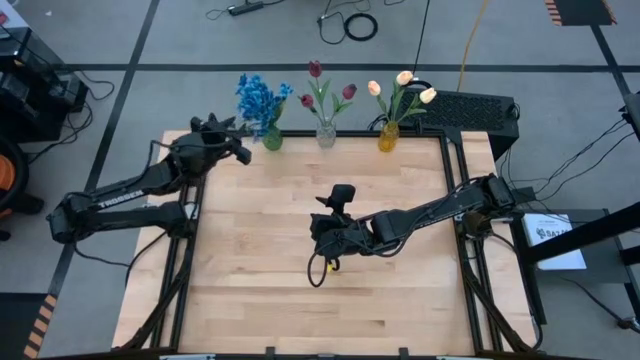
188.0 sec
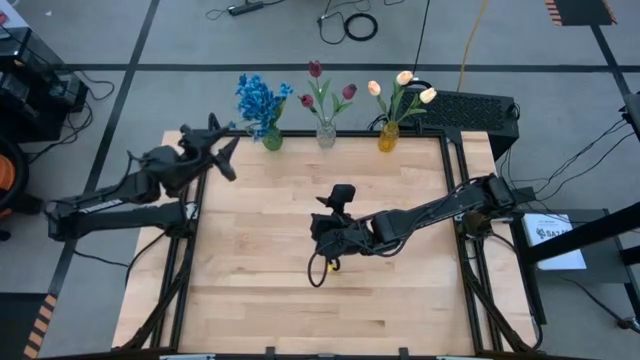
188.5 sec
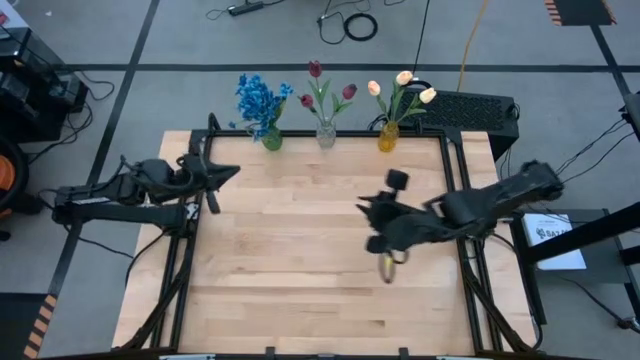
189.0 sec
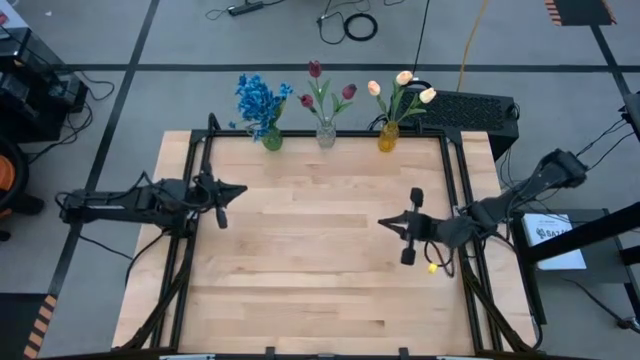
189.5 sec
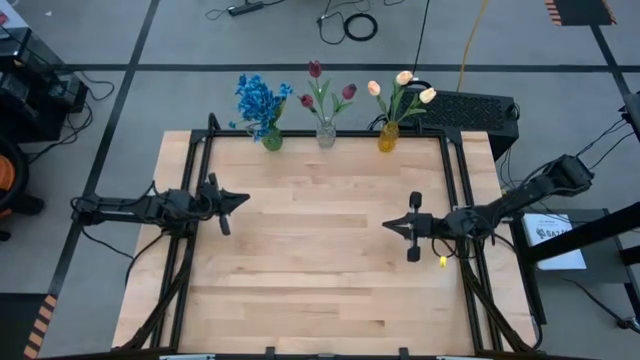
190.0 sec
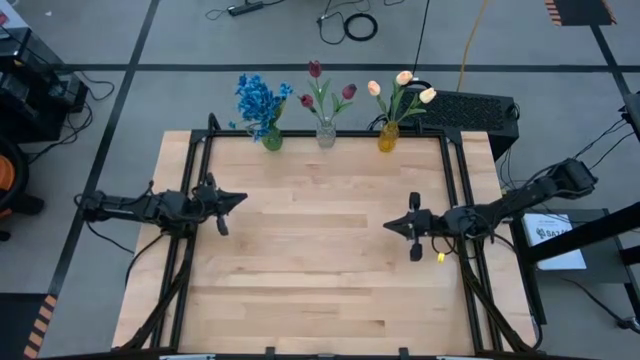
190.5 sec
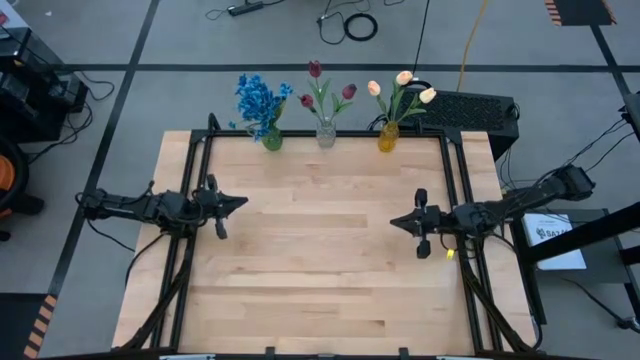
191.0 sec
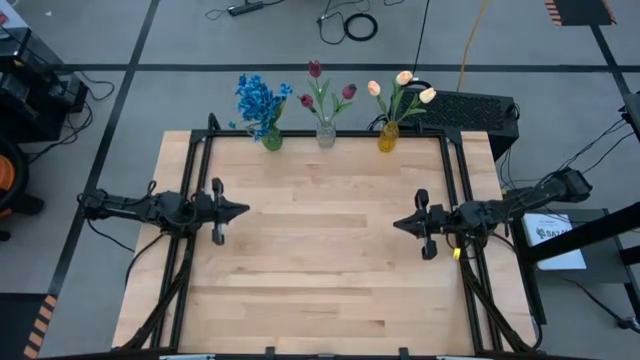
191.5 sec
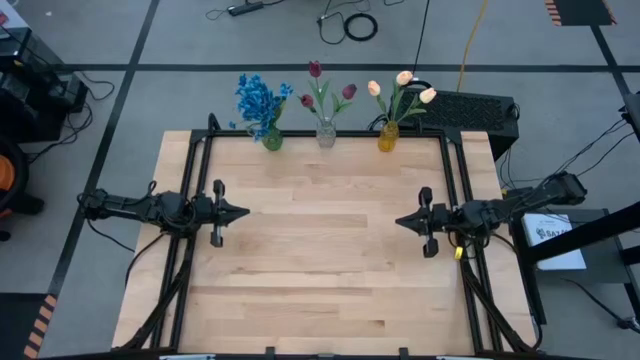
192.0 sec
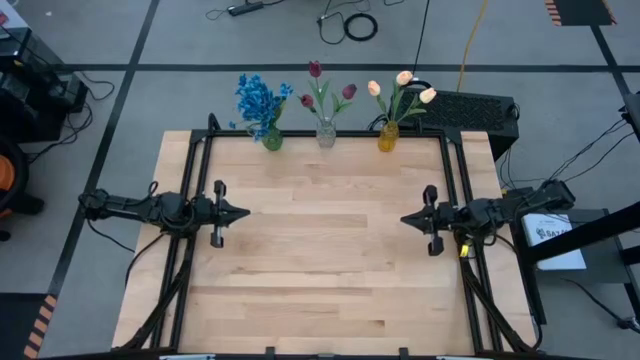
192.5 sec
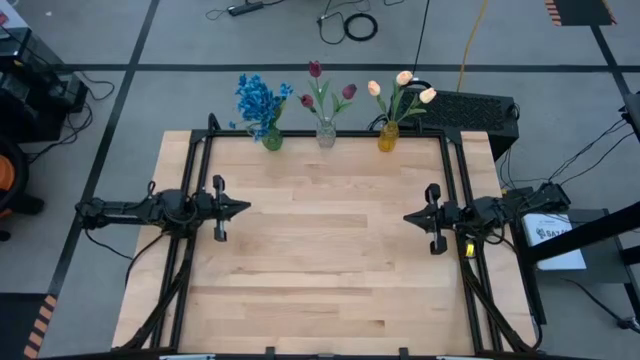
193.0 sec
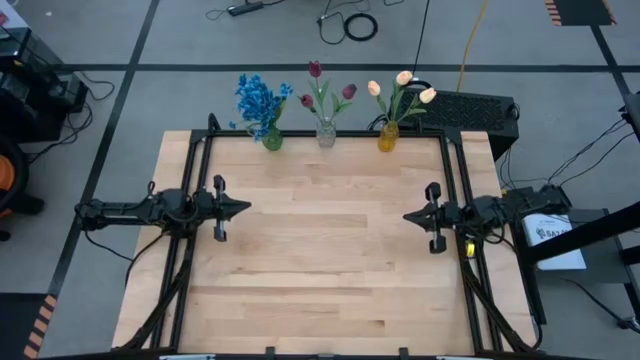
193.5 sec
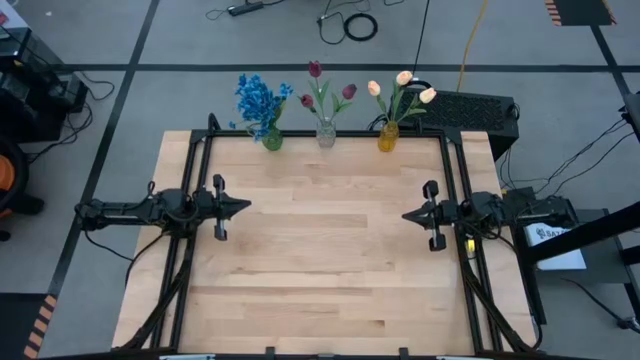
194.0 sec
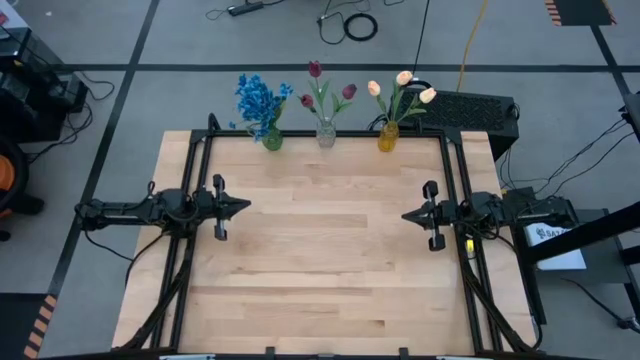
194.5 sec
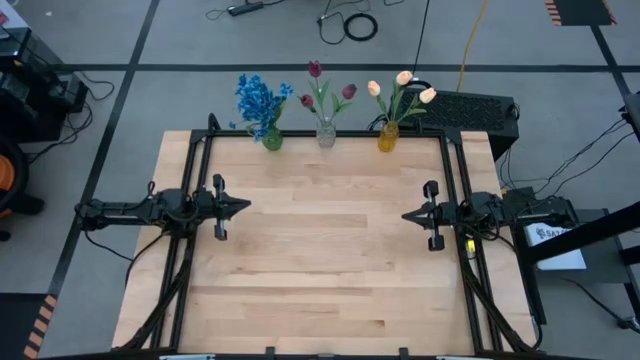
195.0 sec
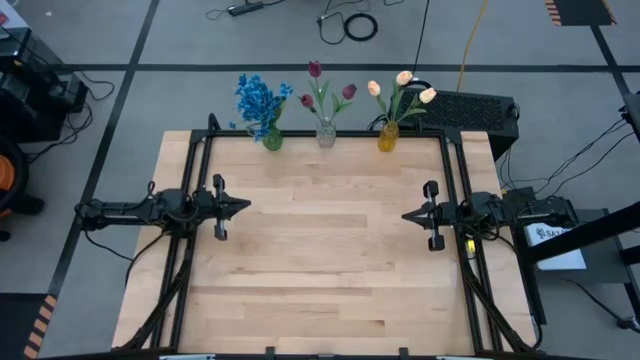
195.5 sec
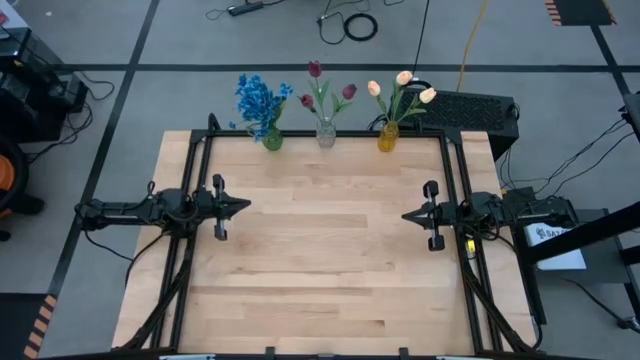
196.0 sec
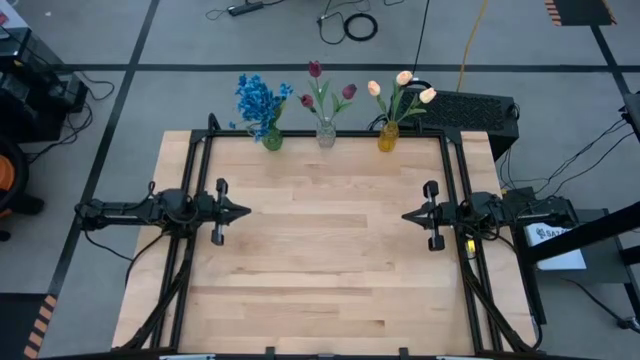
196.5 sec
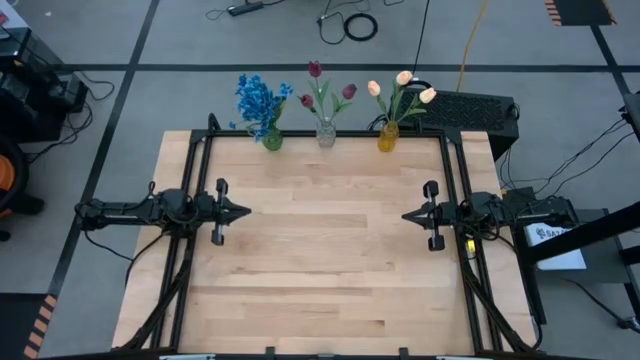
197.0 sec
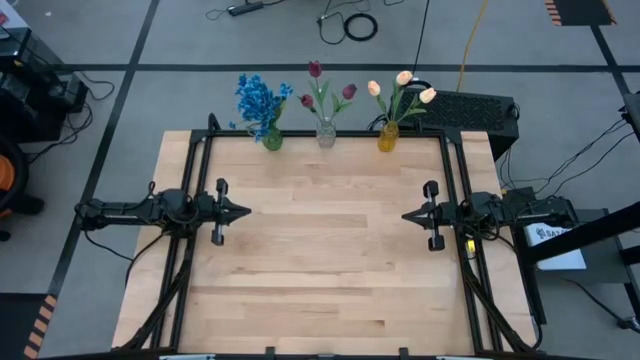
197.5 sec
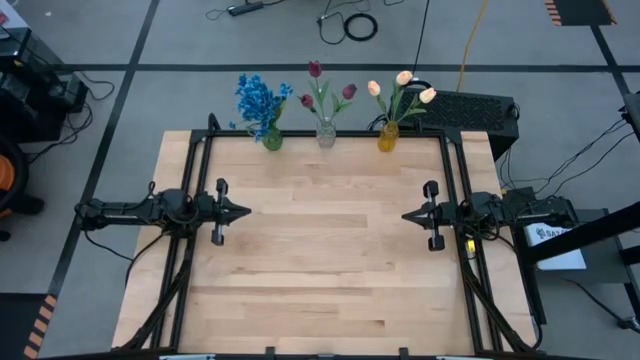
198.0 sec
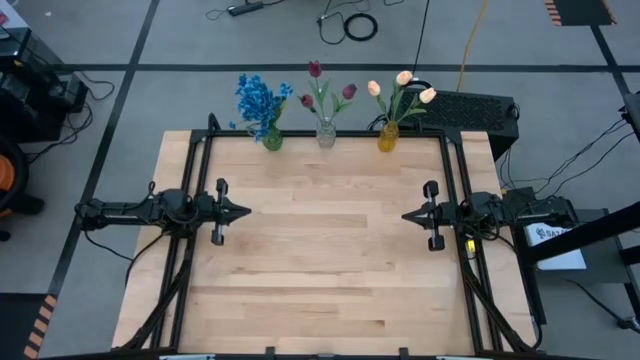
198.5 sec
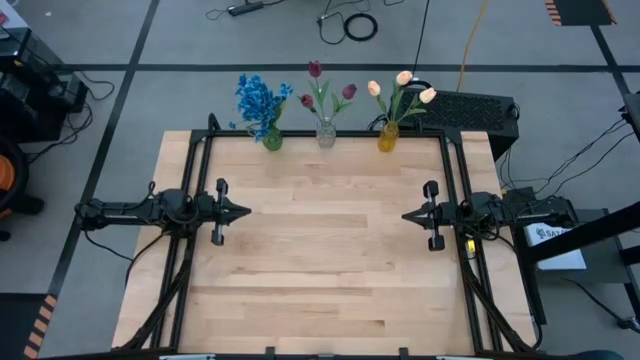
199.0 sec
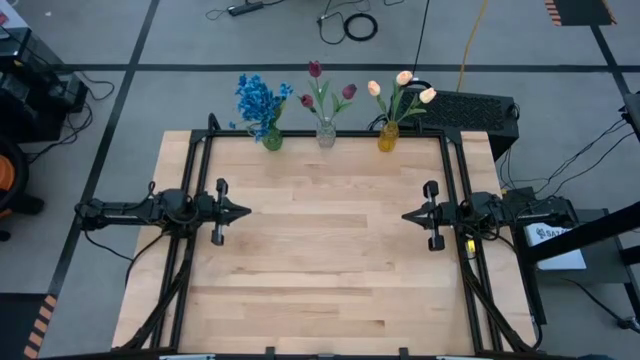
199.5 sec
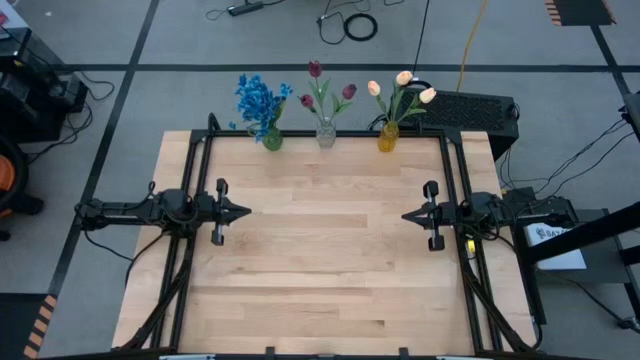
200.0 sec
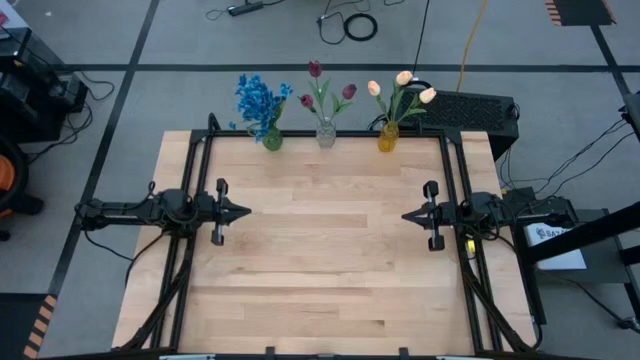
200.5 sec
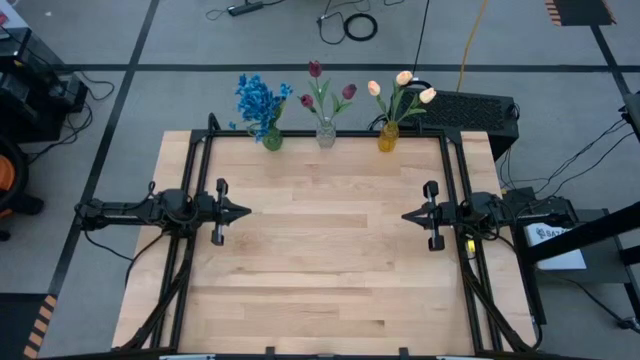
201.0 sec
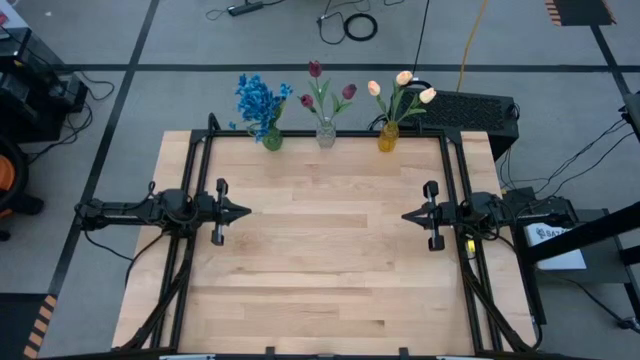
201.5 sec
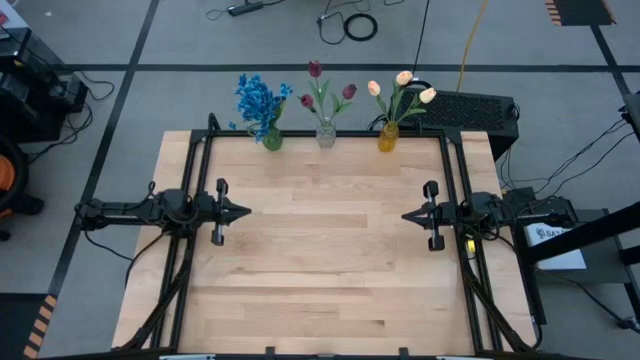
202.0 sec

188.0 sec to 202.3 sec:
Task: Sort flowers into vase by color
Return to Home Position

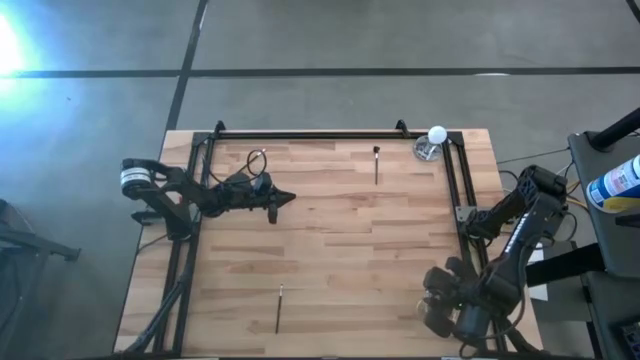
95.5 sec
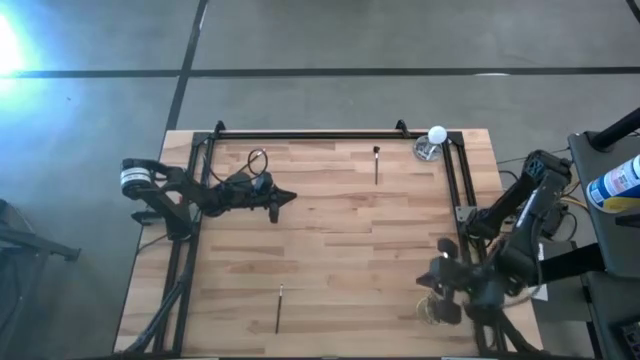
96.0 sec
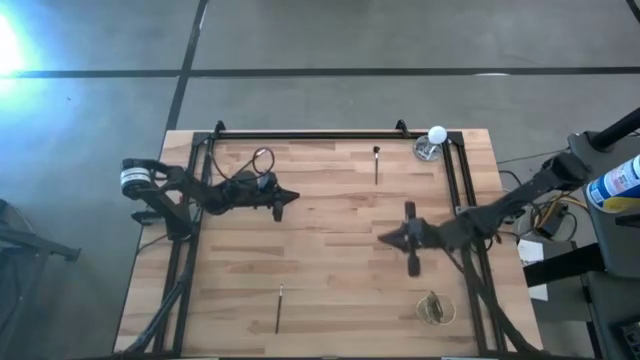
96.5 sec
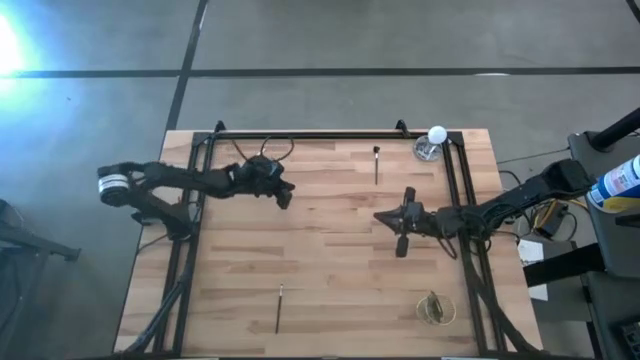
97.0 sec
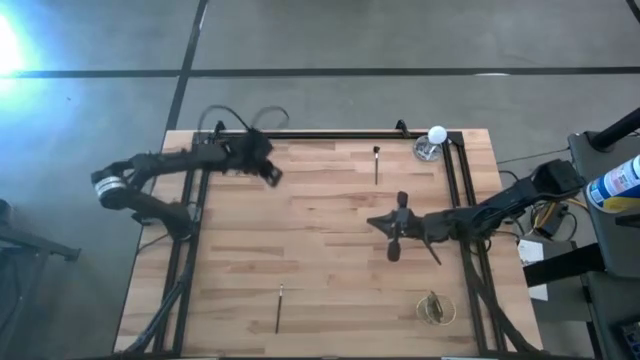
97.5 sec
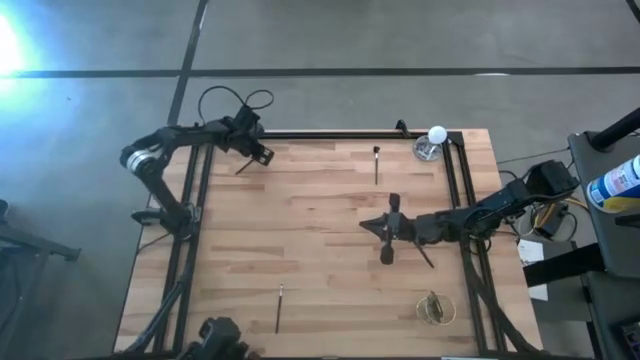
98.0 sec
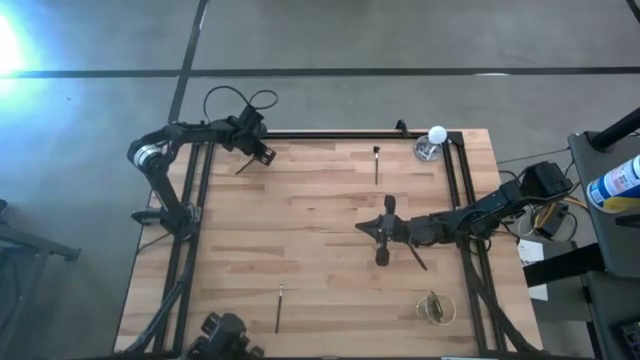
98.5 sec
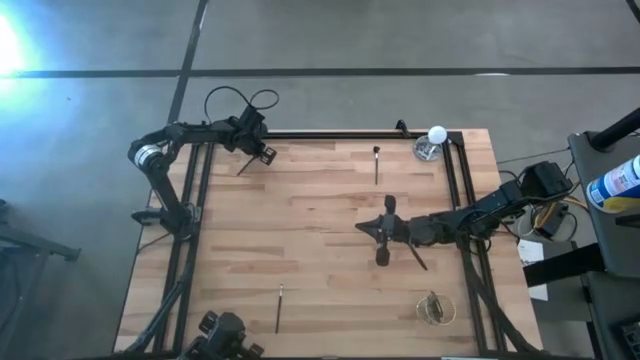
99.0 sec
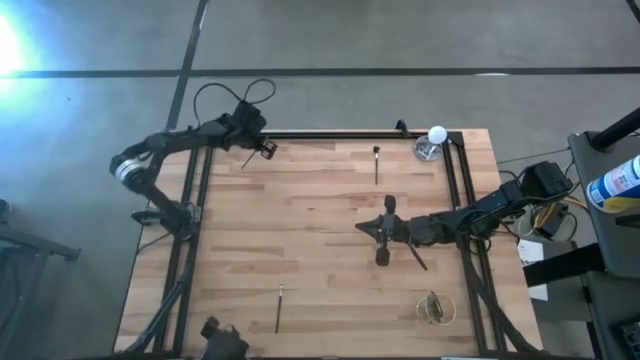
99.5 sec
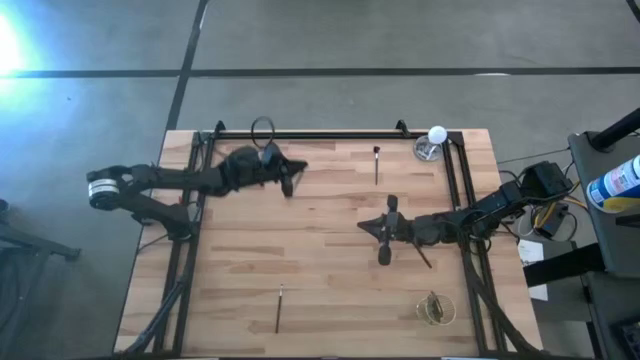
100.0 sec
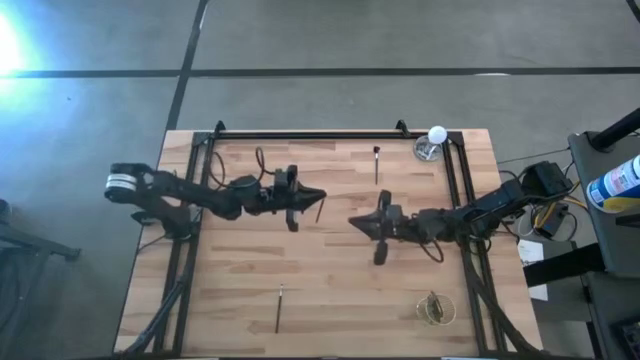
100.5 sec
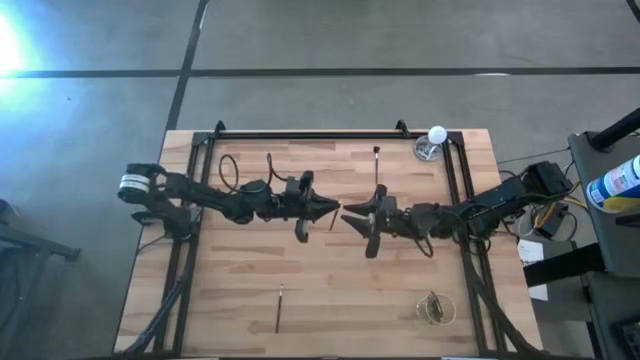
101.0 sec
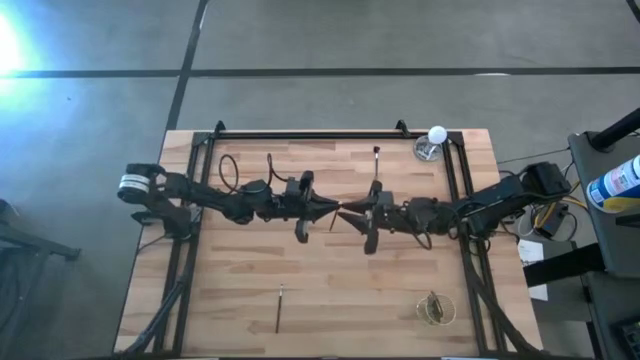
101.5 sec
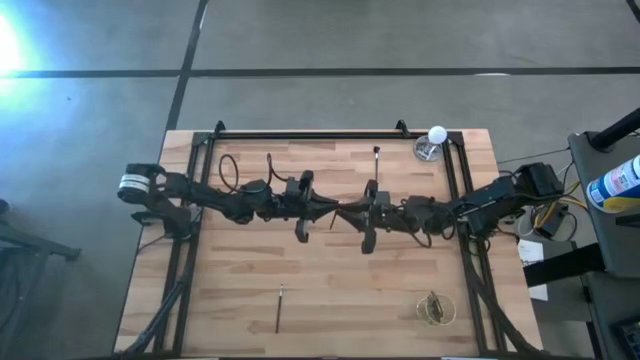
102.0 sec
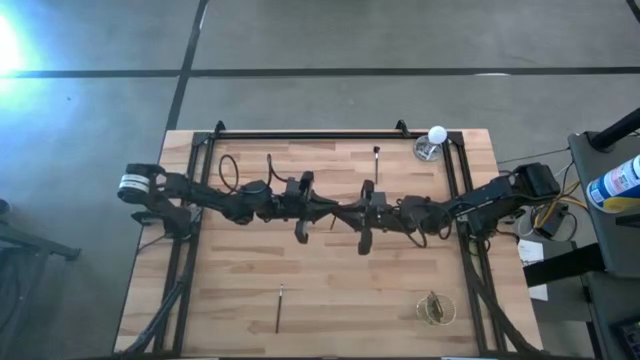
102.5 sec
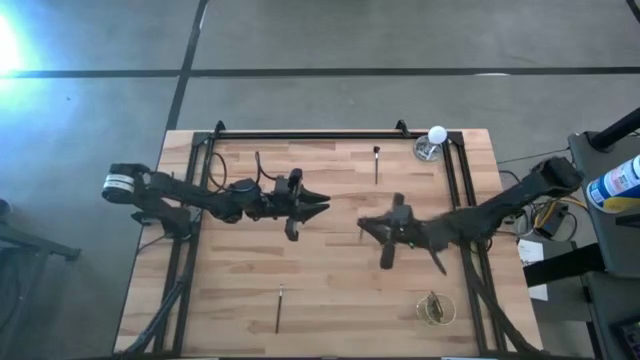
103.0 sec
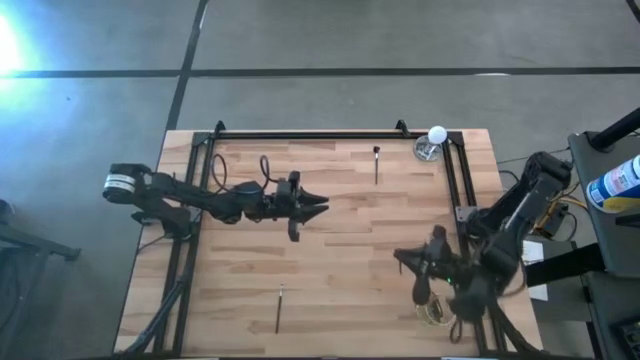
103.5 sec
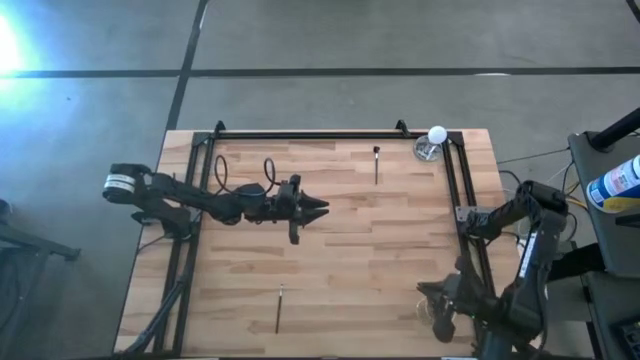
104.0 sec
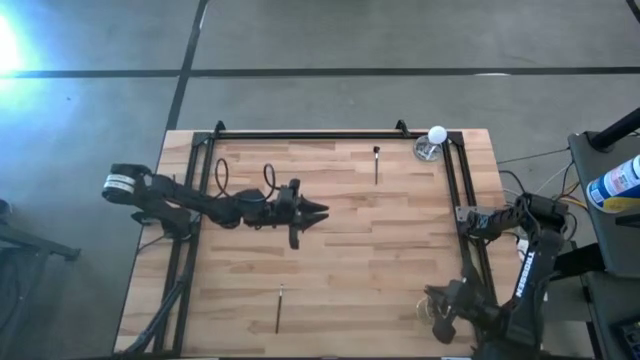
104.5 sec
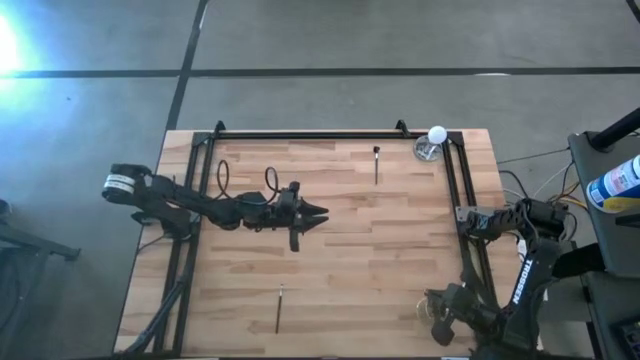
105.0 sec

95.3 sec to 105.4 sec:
Task: Pick & Place Makeup Brushes
Put the eyeshadow brush into the makeup brush holder
